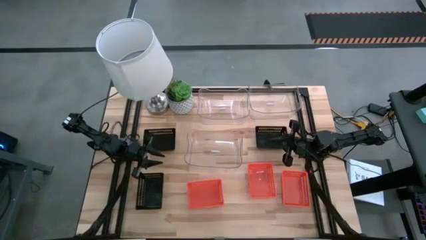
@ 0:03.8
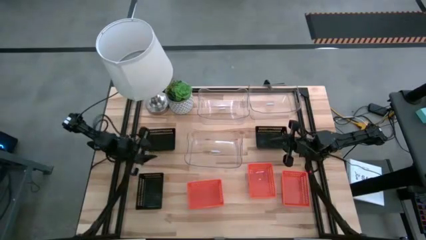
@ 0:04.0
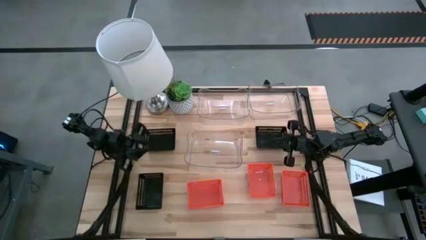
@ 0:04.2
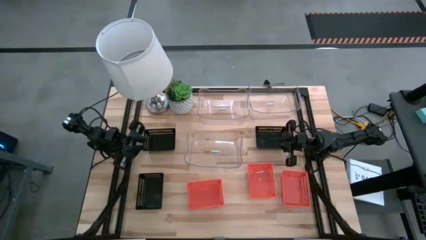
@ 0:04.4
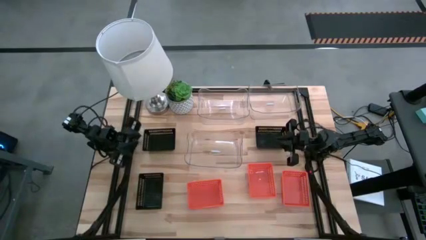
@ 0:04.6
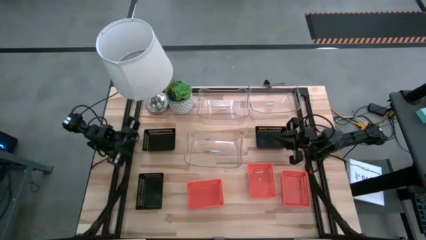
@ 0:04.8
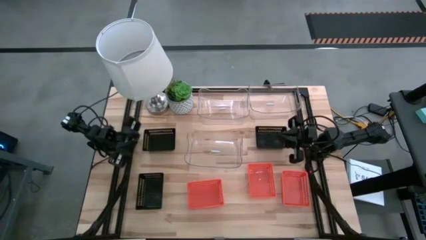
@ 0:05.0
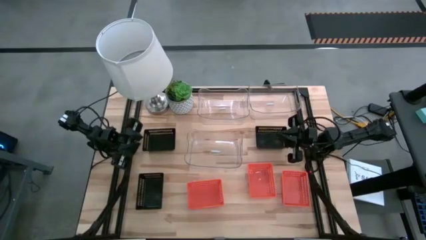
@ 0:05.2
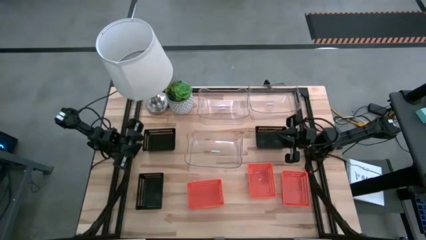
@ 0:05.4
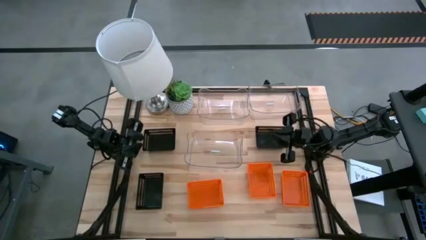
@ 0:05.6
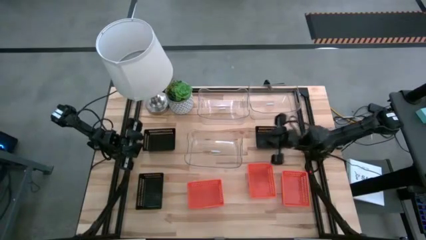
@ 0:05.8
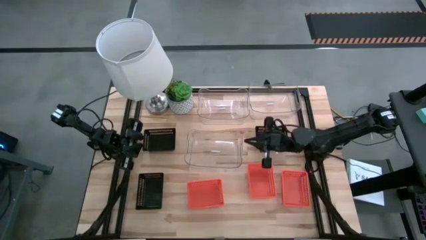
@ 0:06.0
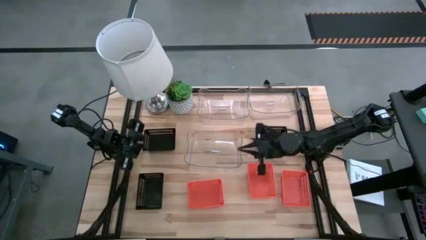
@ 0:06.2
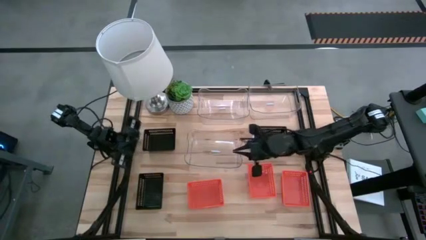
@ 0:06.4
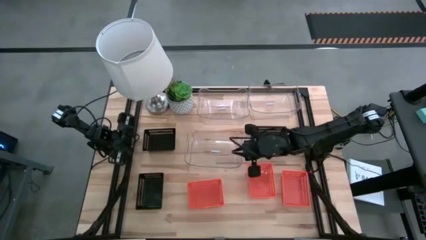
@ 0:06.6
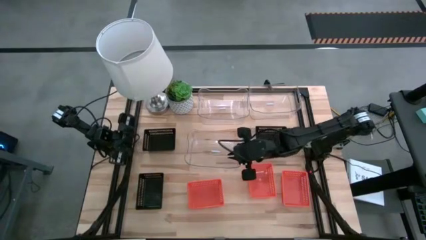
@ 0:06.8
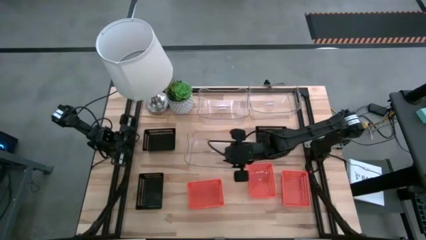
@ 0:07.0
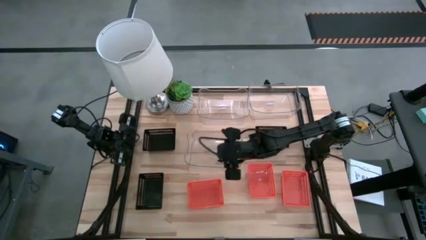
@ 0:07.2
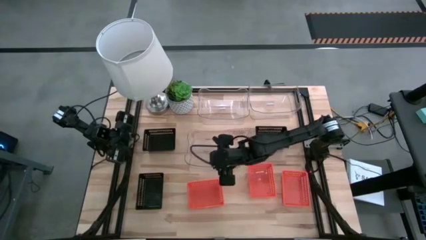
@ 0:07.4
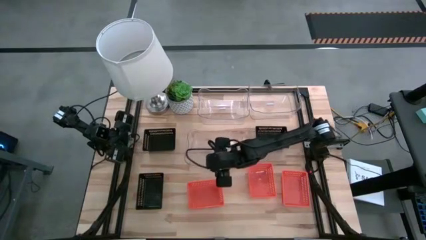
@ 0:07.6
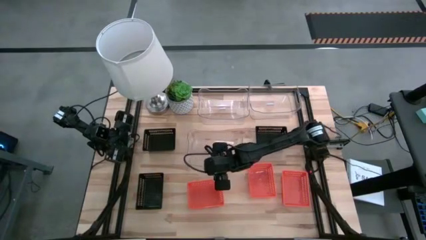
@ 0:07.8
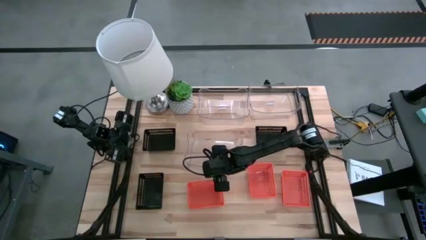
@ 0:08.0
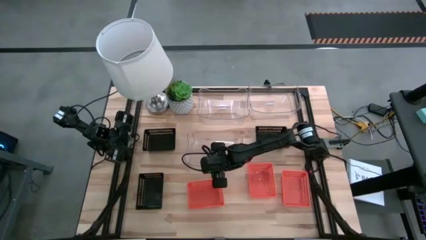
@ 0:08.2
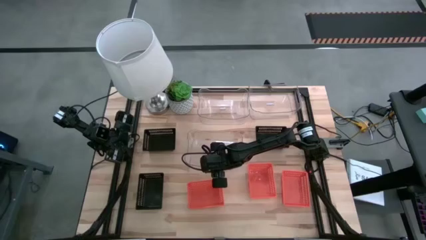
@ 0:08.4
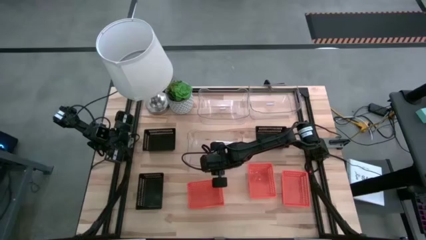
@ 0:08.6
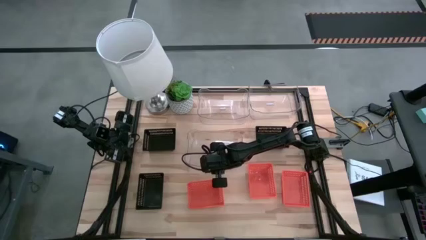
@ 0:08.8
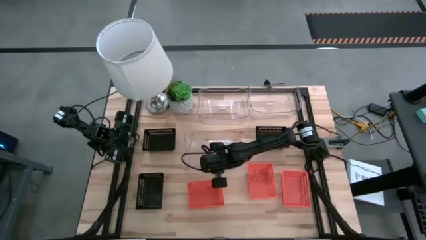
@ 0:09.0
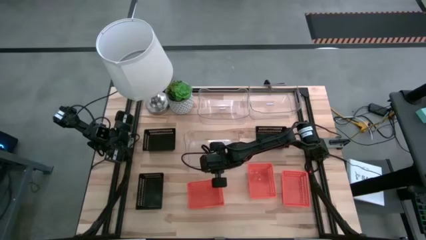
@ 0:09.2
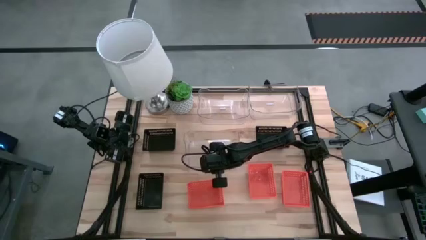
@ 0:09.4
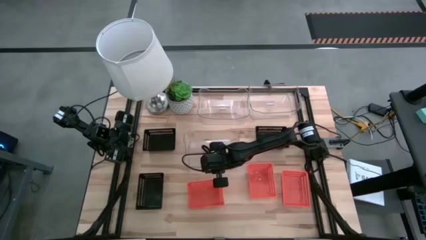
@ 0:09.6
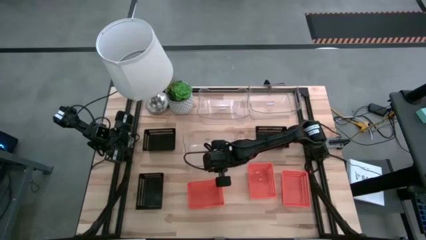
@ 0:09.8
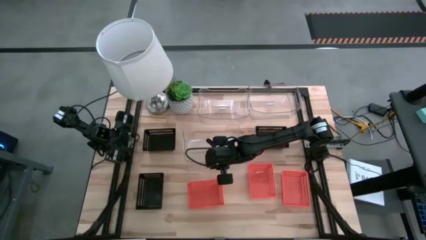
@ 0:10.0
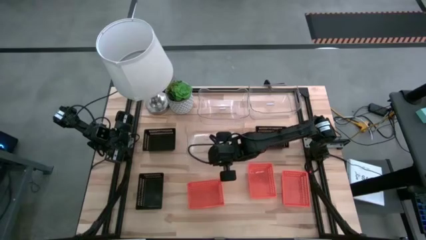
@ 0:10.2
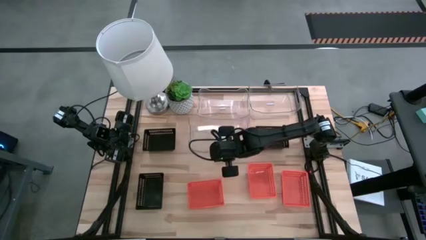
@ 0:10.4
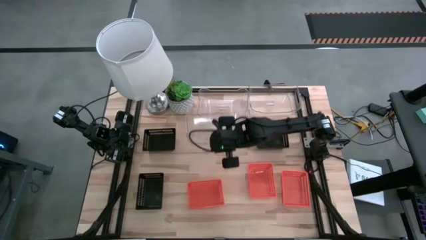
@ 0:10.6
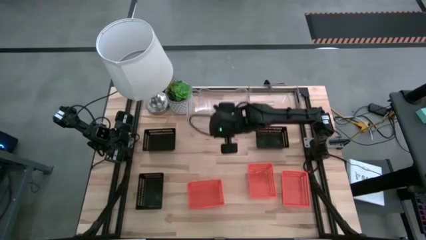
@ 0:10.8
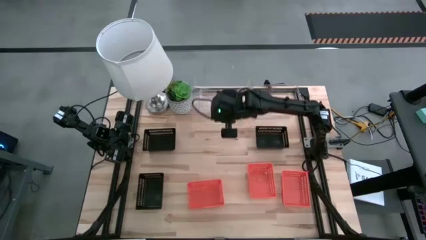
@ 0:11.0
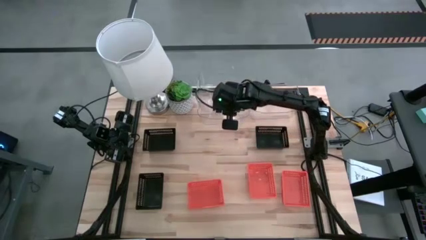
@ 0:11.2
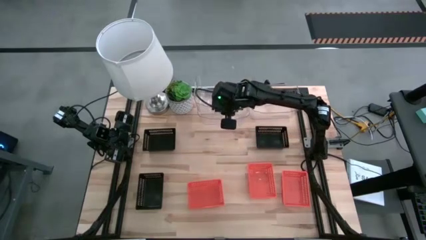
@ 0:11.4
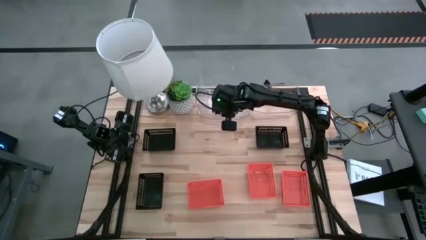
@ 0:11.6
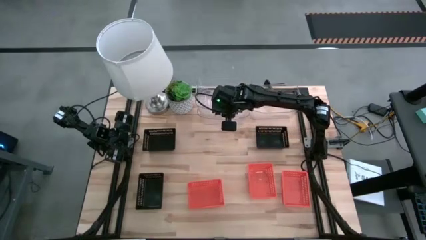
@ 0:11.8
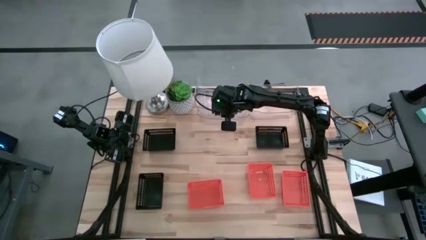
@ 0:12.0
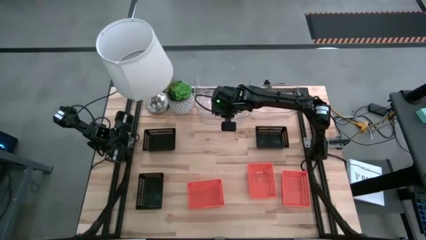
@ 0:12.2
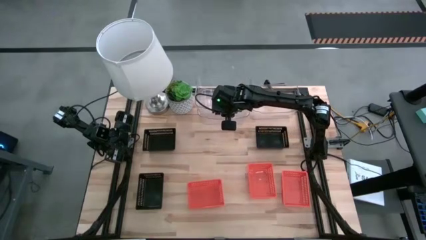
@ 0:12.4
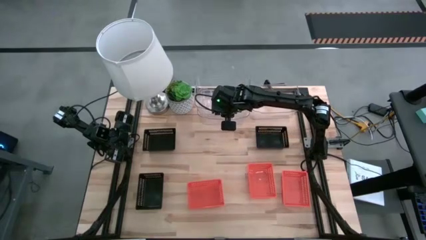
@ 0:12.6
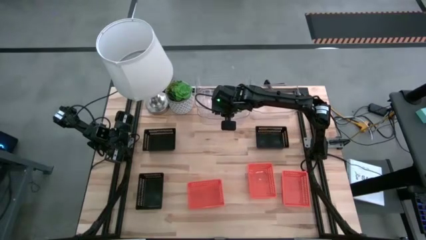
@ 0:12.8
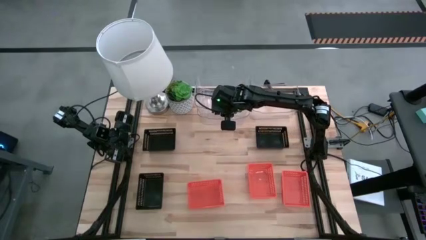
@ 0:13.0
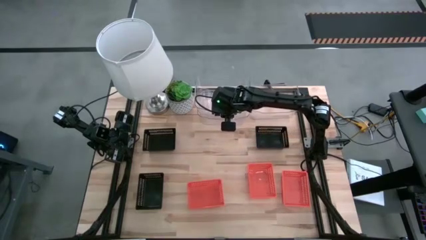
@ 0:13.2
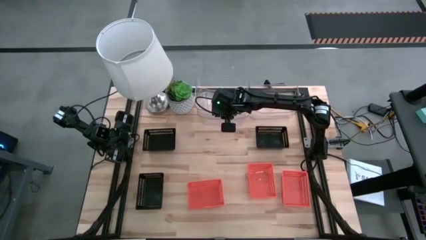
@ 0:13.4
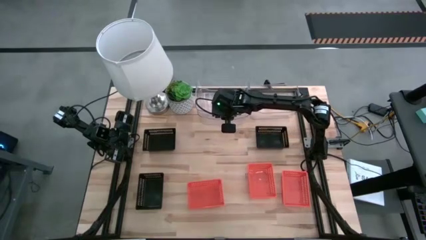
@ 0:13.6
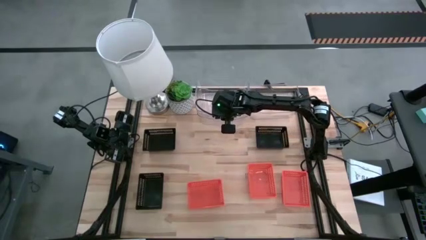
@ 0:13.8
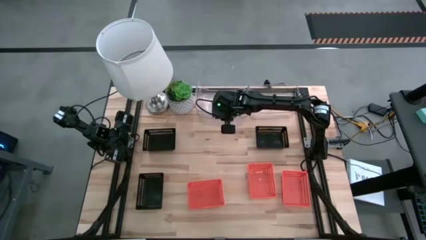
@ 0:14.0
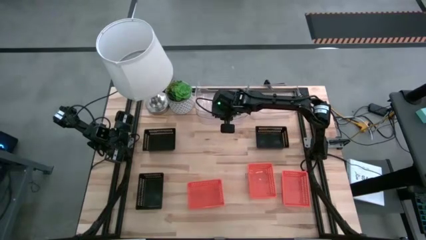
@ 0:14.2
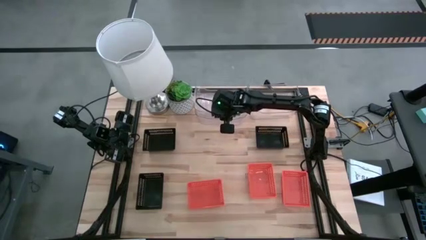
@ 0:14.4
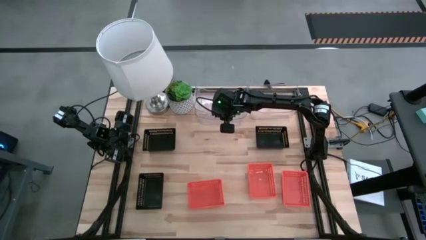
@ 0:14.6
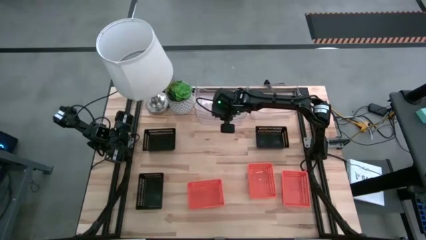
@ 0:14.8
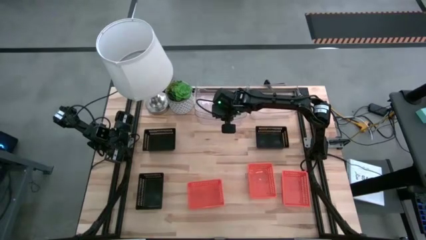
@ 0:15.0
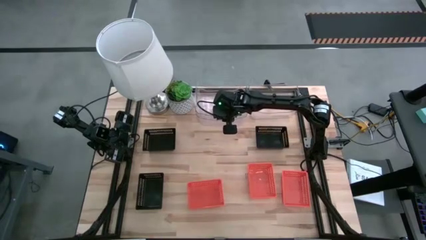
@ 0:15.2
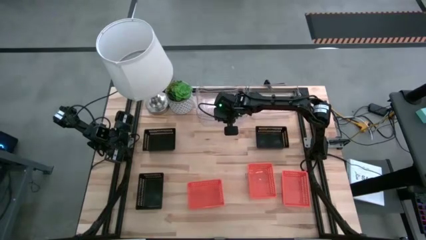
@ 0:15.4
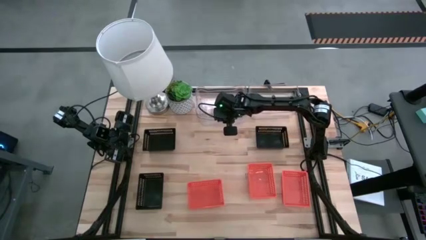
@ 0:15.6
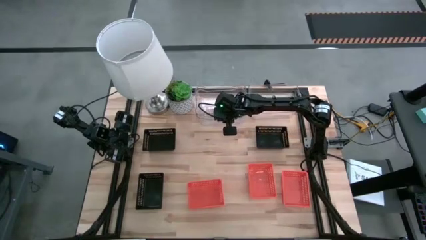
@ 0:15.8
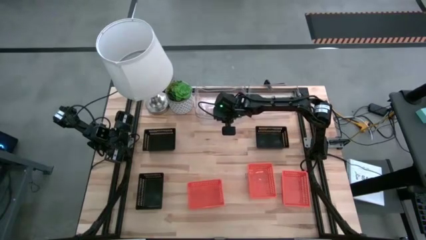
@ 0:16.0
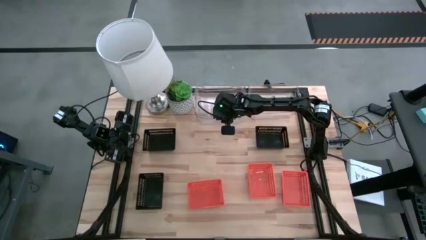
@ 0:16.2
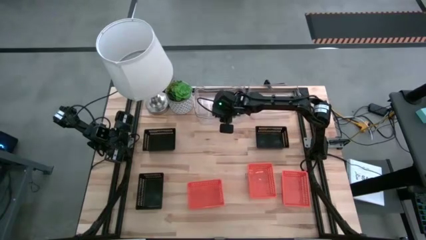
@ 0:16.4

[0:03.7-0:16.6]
Stack the bottom transparent bin on the top left transparent bin
